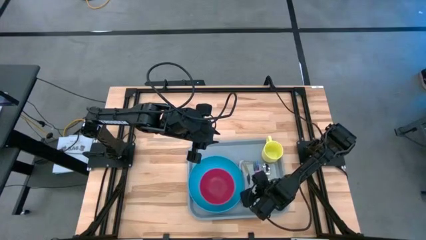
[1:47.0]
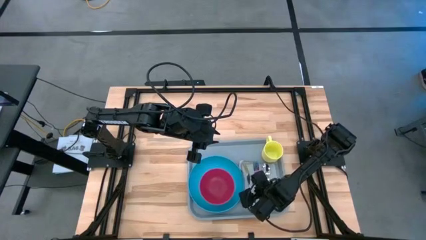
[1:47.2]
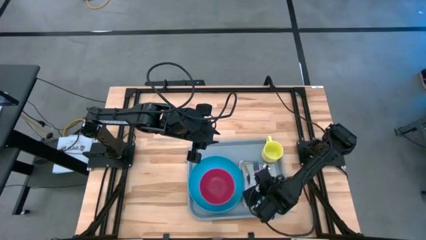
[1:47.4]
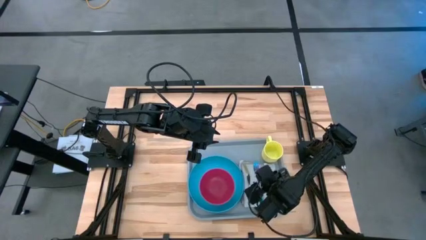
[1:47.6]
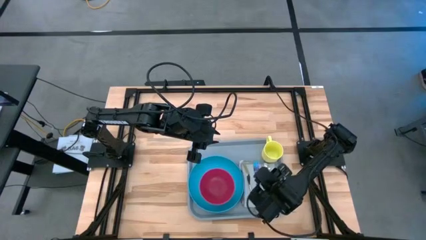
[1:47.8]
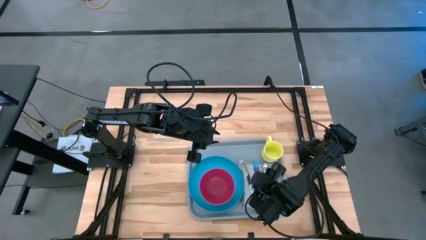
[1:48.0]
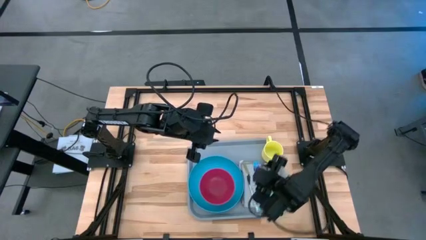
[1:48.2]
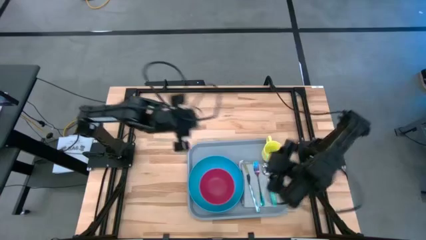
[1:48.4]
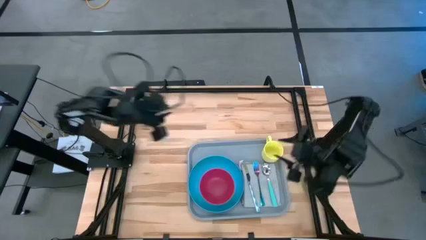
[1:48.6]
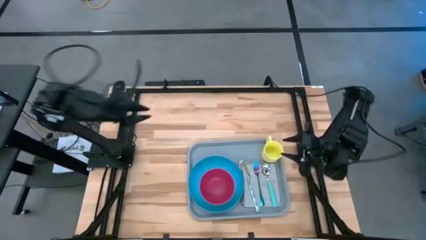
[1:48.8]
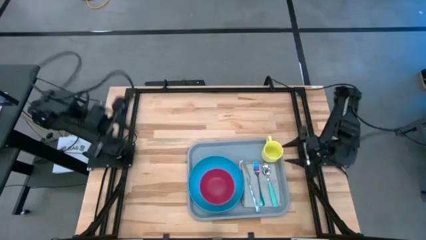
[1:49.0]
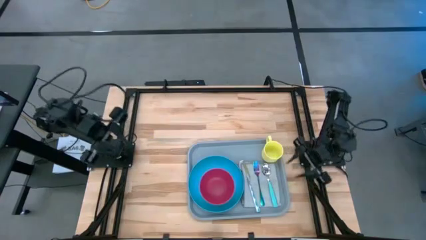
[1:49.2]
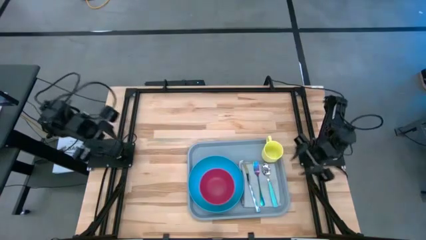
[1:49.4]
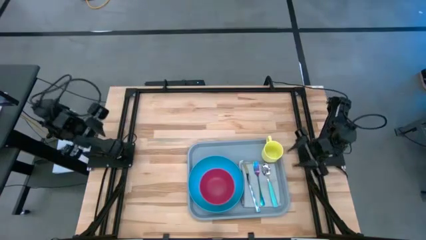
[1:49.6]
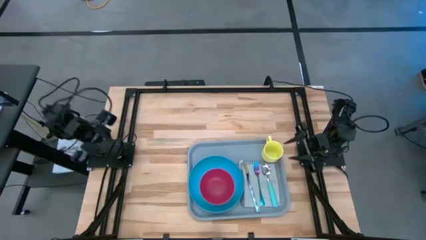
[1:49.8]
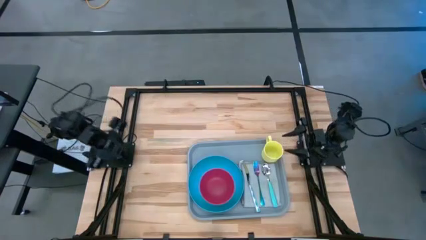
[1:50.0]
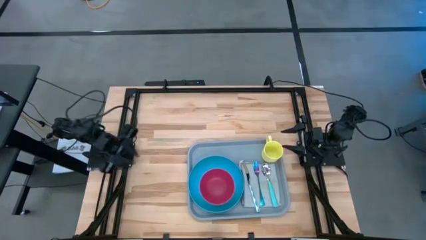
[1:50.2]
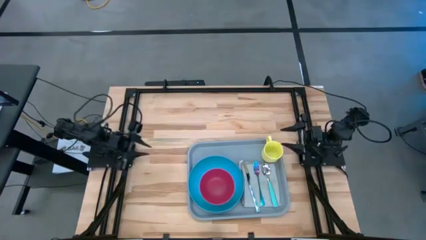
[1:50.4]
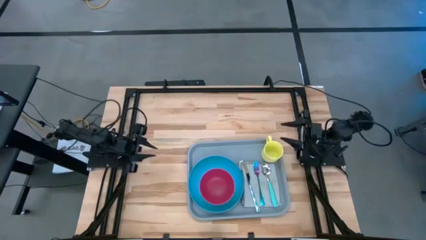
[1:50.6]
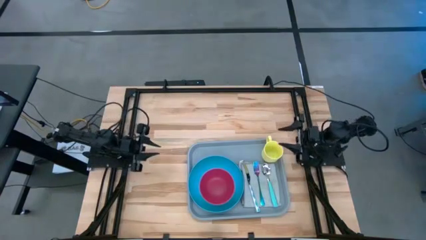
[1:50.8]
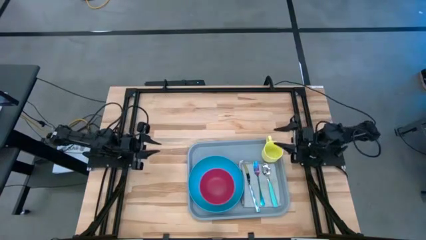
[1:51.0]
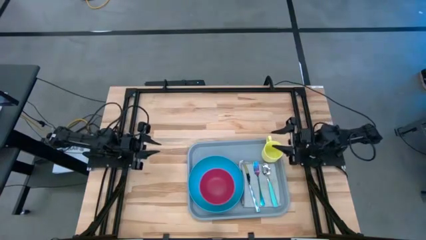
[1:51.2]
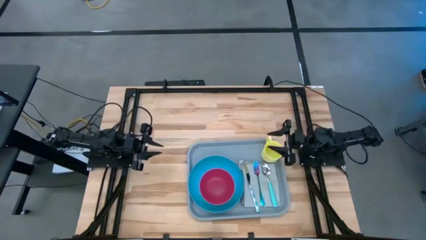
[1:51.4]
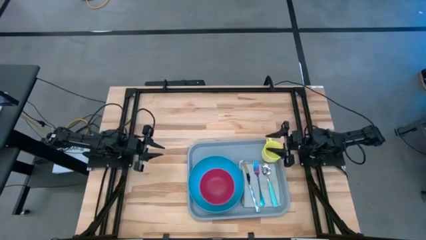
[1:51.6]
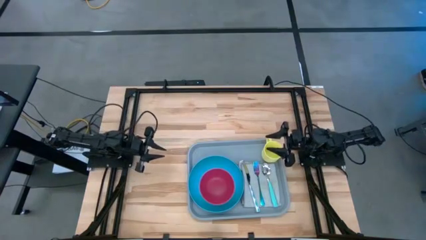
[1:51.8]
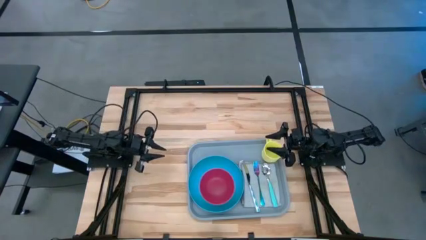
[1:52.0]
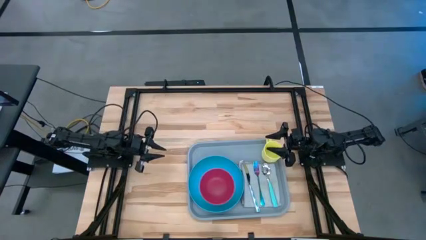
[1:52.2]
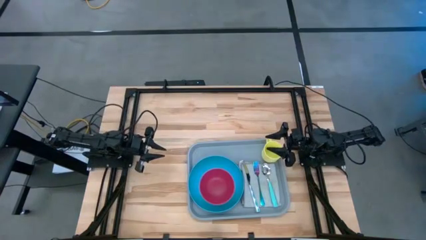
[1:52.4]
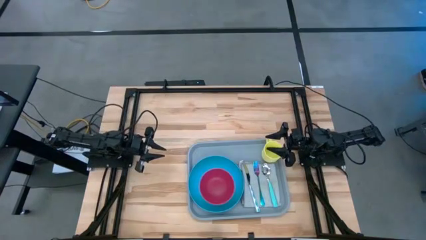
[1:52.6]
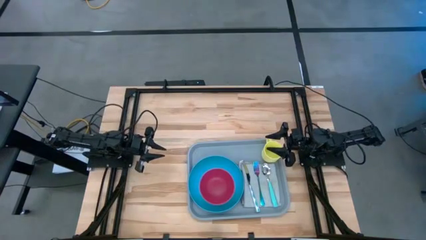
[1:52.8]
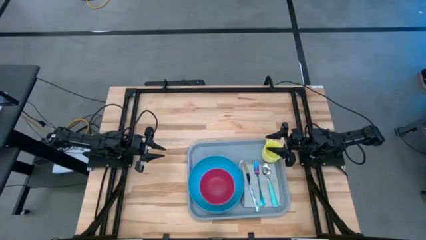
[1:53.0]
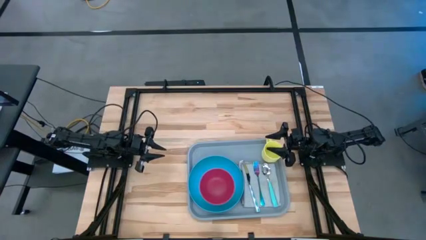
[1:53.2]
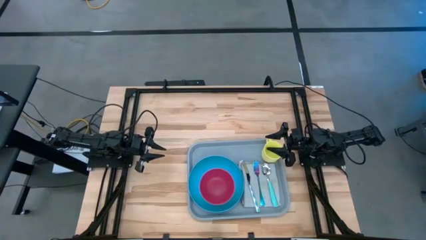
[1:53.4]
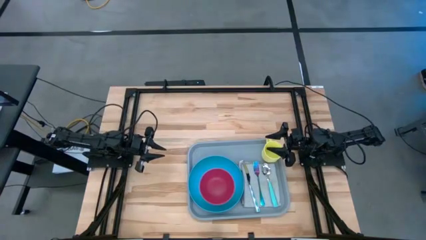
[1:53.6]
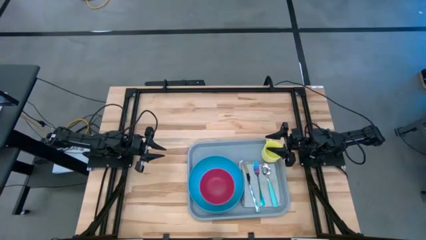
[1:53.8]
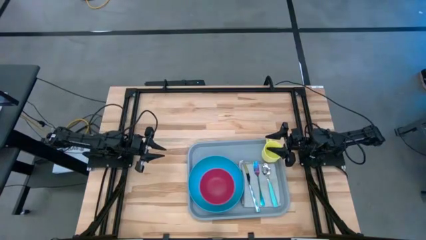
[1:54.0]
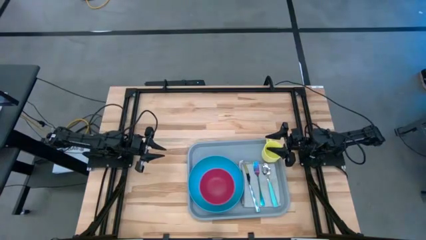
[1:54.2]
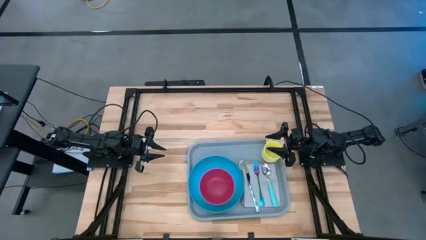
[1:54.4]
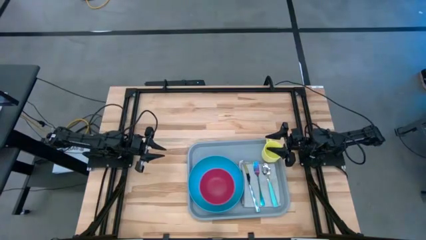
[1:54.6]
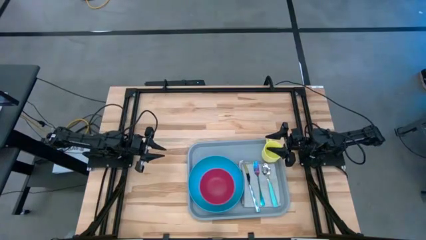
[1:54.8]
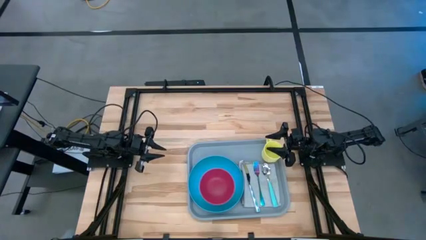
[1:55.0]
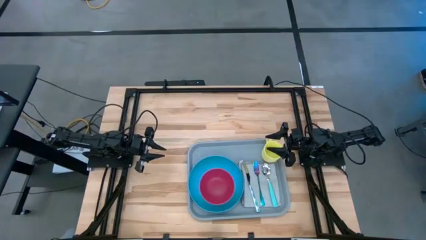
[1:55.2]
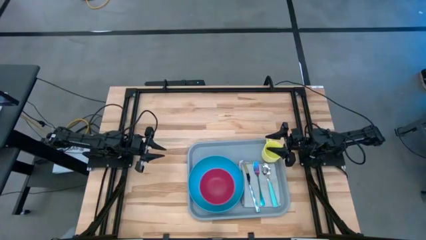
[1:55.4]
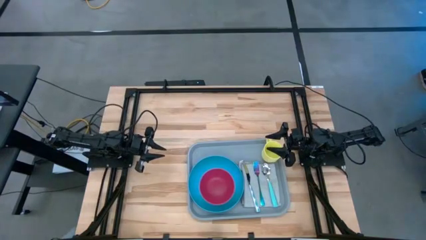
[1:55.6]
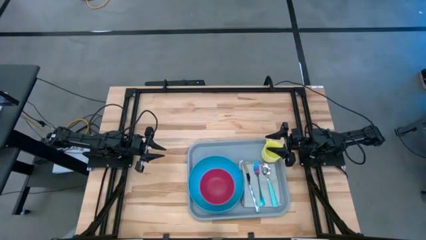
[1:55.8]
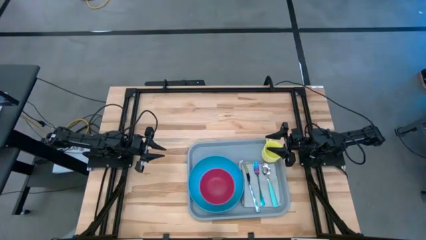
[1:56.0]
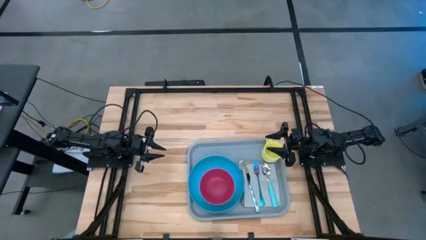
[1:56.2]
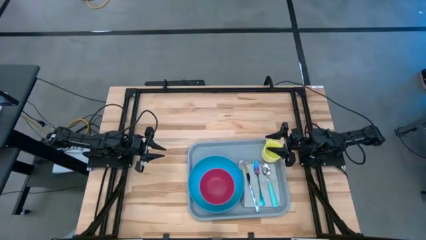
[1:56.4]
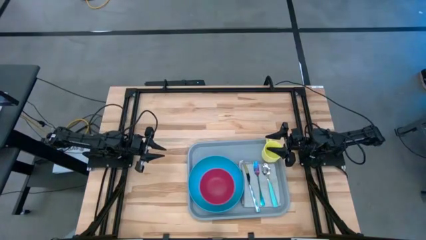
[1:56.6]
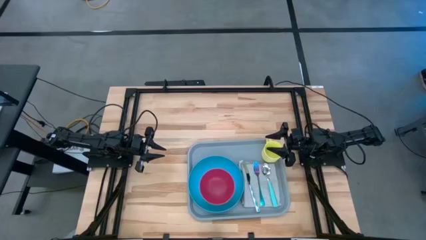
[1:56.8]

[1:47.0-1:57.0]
Task: Set up tray
Return to Home Position

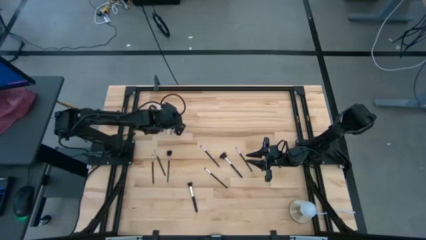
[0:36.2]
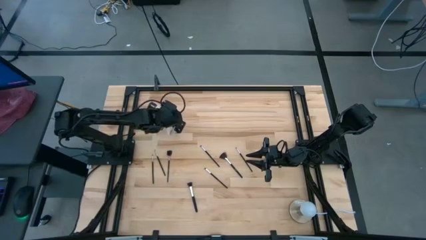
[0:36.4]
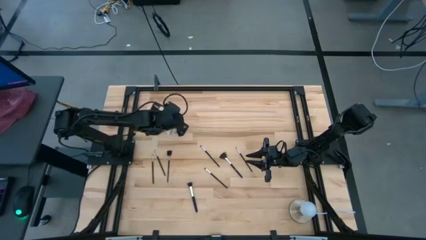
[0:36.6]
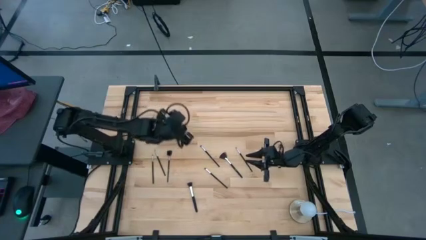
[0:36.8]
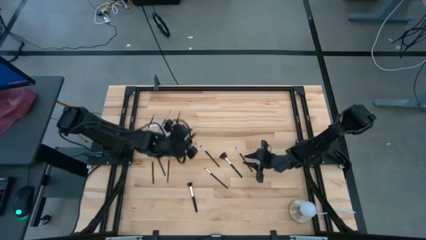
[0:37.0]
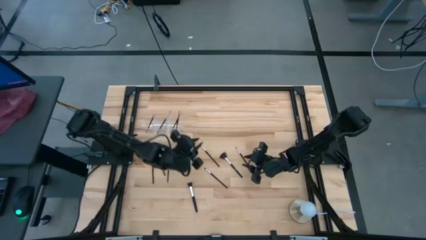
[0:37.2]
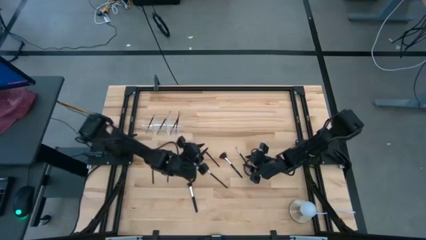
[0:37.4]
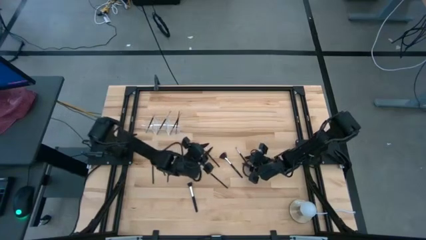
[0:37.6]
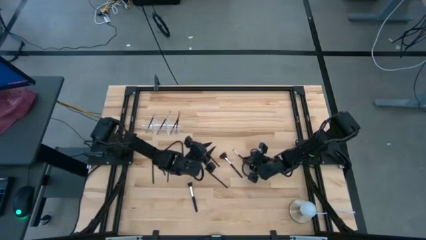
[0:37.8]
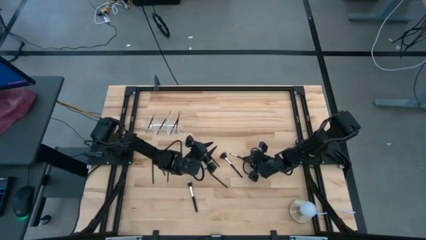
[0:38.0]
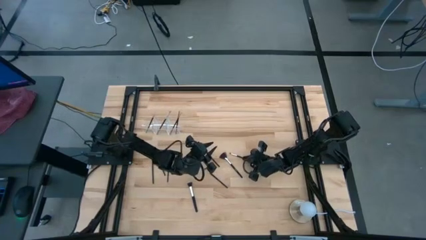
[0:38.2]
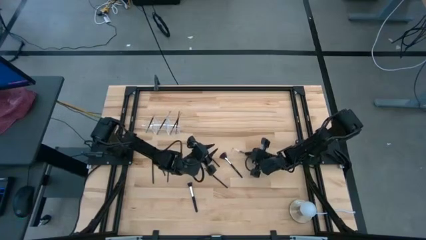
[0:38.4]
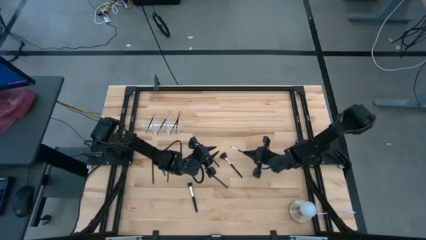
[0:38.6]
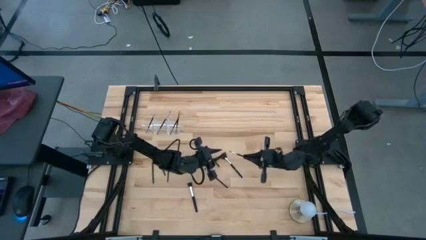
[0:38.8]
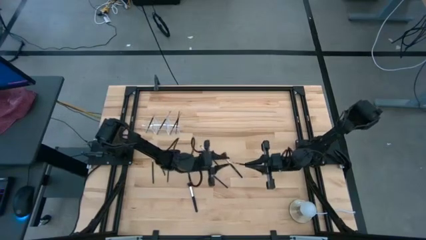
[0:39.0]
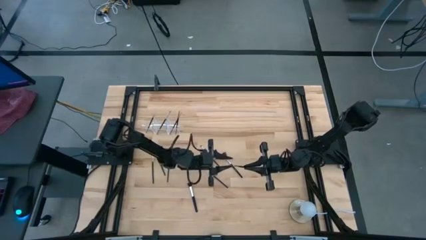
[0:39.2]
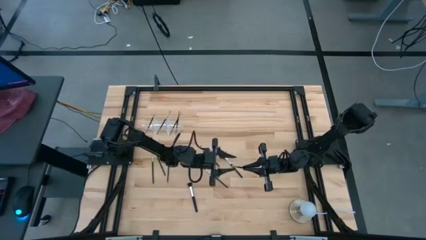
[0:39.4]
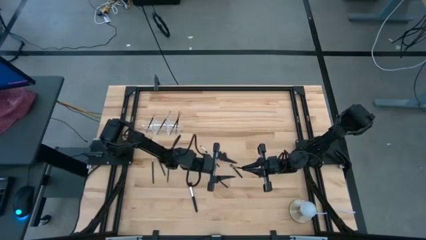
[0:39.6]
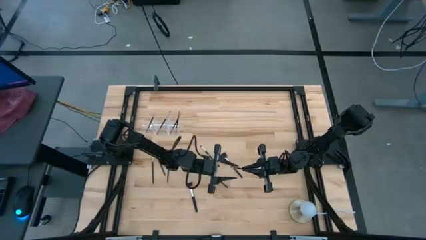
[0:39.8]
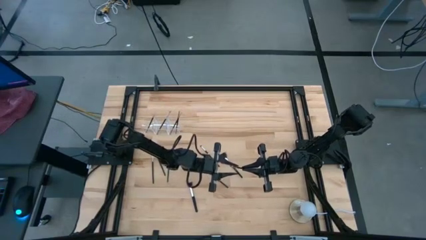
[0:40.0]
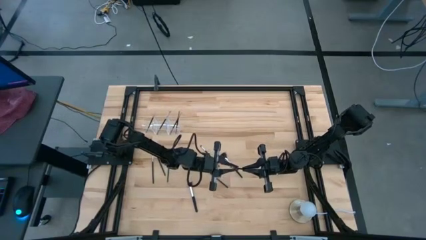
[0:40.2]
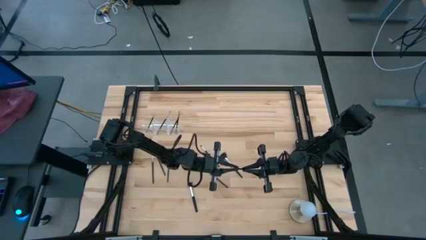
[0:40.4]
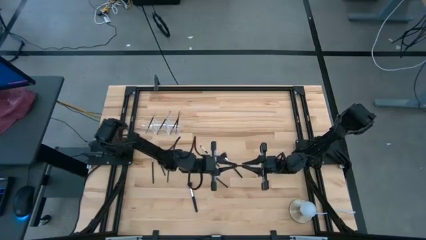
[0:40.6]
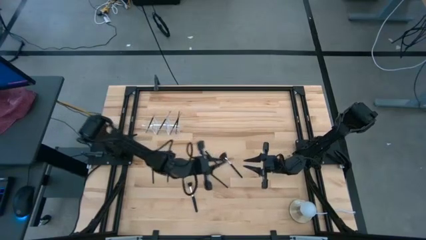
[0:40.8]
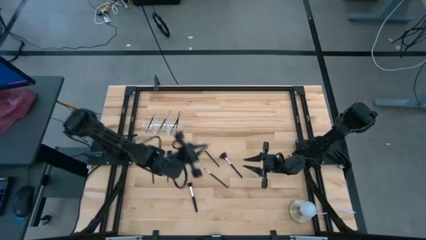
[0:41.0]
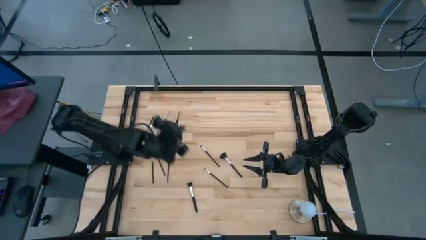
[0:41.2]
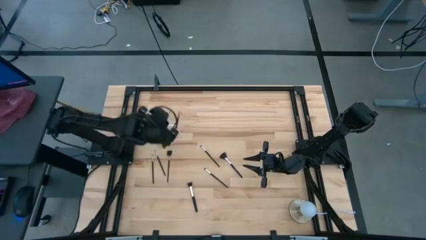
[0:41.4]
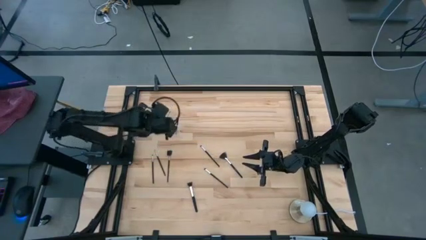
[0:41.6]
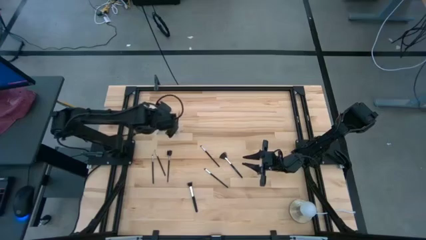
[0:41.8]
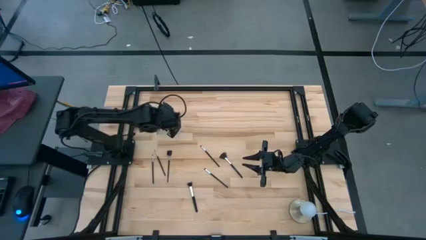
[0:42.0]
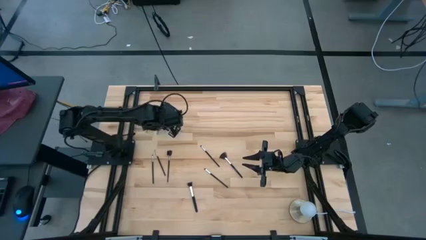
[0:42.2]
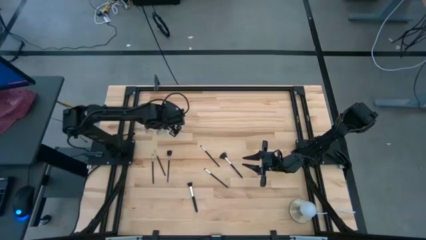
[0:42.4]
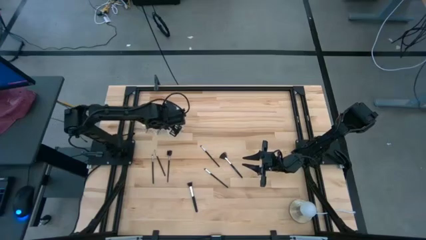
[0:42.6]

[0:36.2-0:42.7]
Task: Put items in baskets/containers
Put the eyeshadow brush into the transparent organizer
